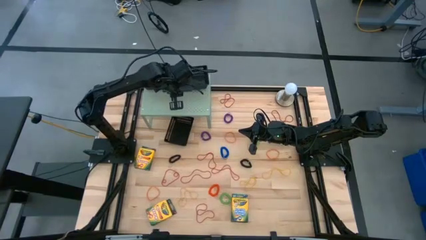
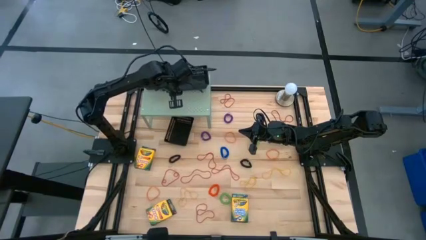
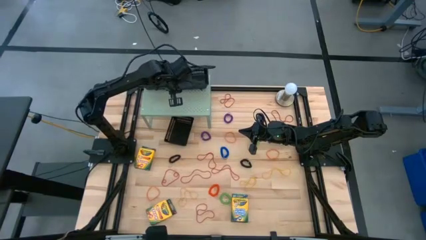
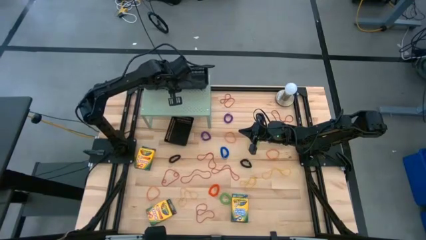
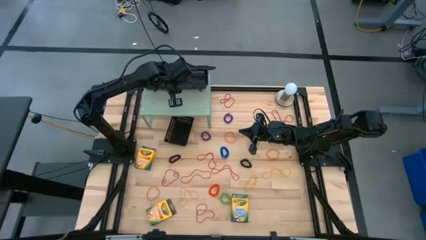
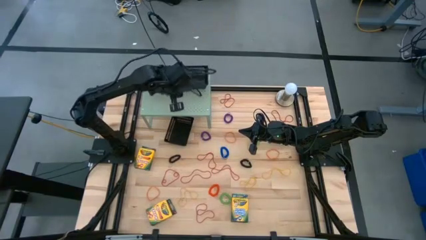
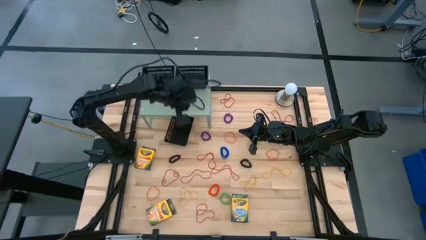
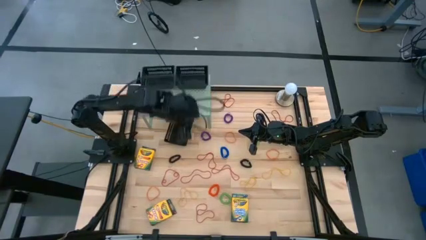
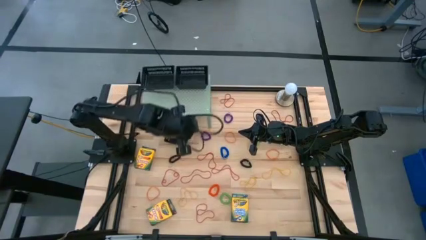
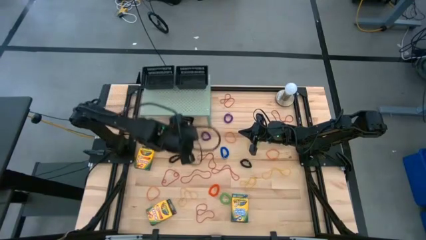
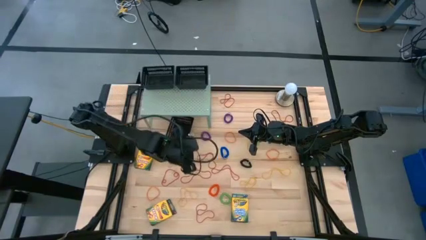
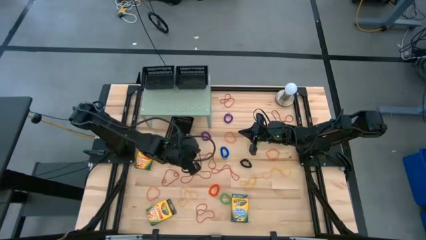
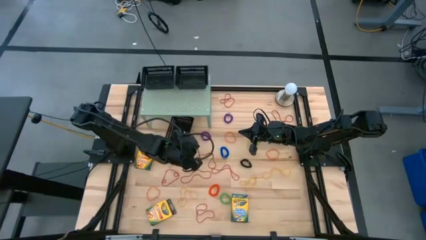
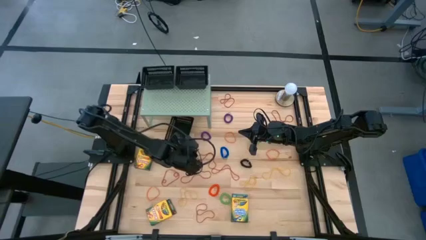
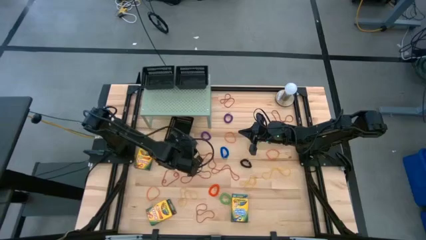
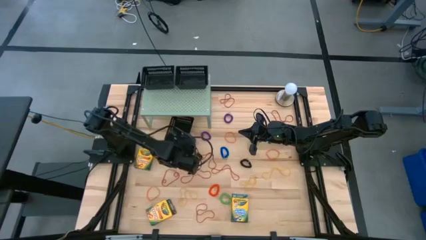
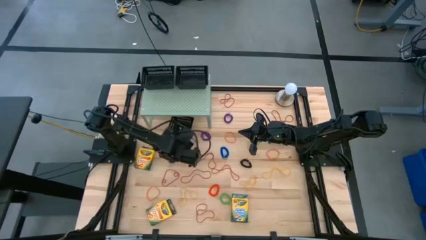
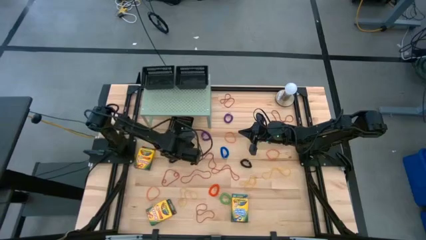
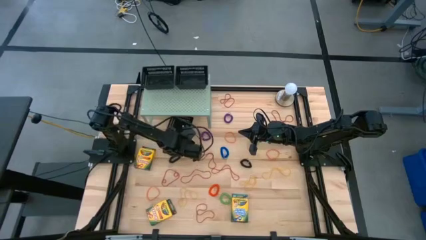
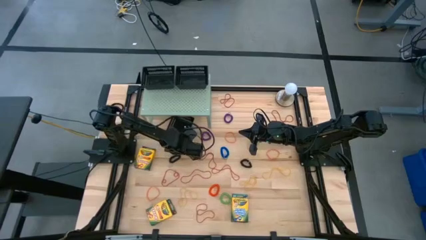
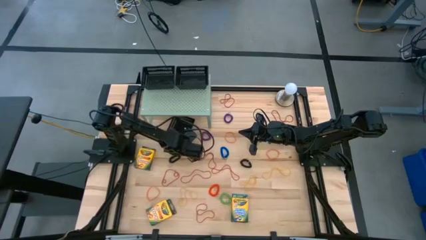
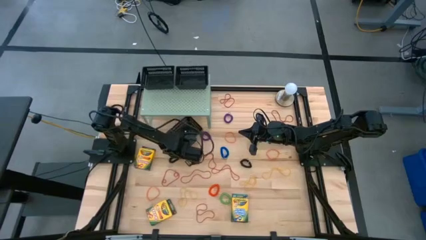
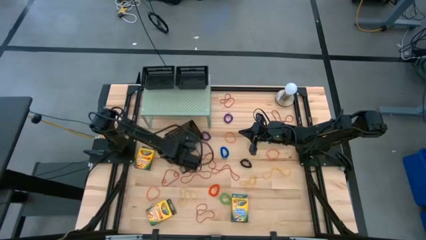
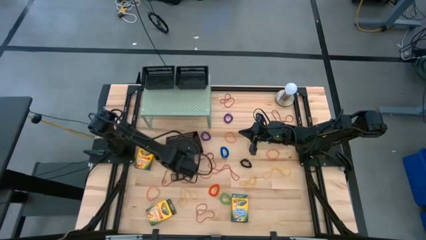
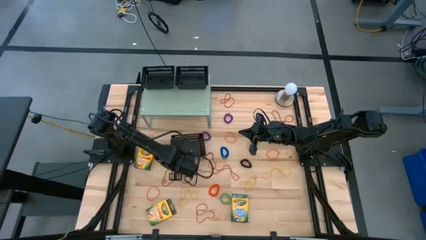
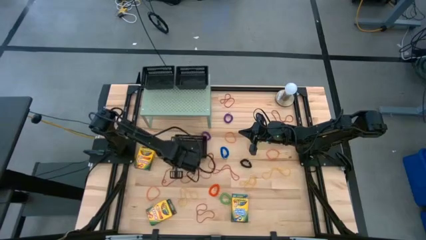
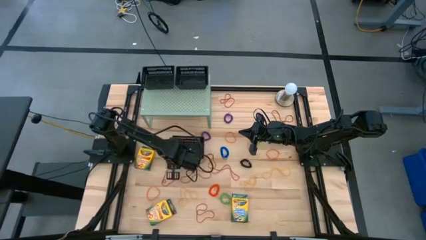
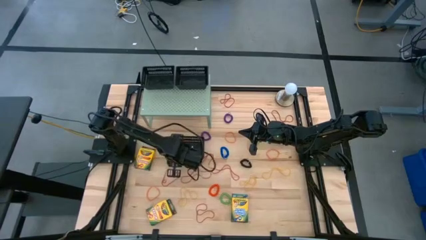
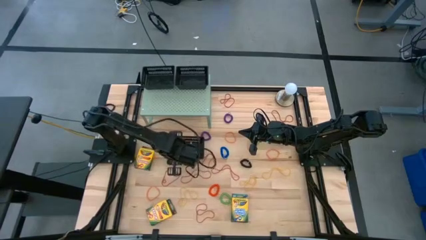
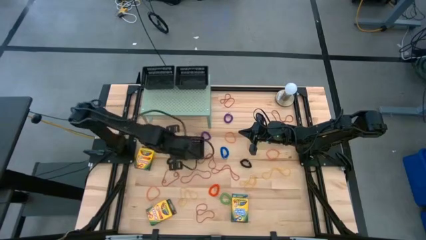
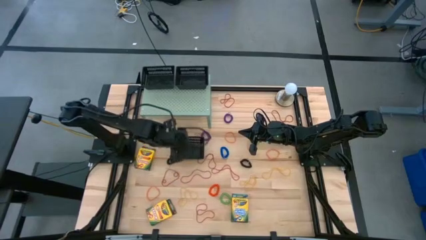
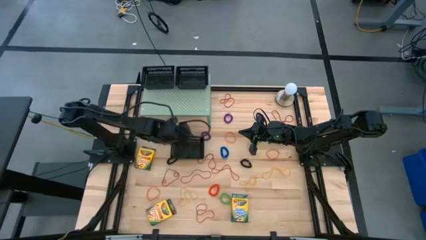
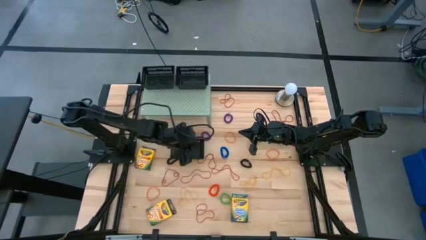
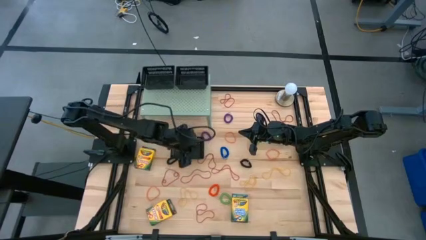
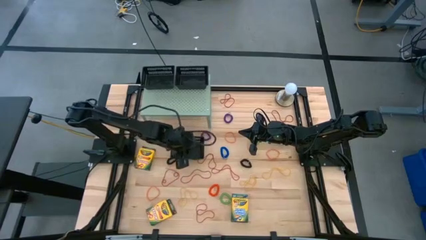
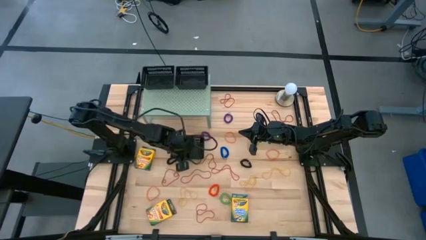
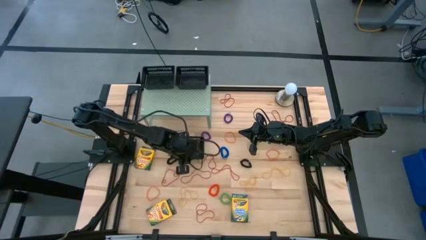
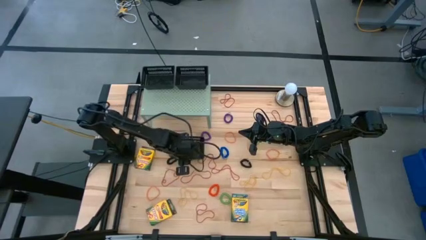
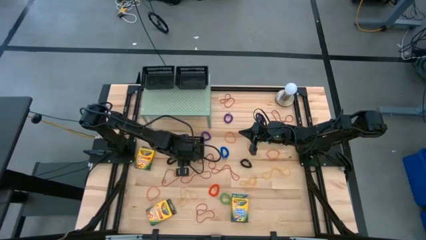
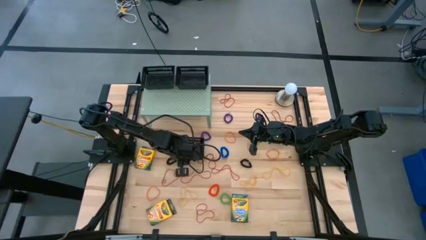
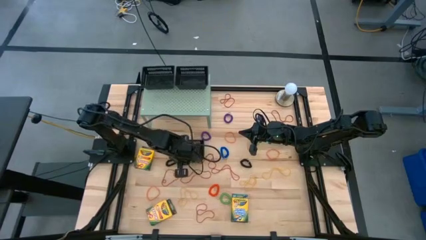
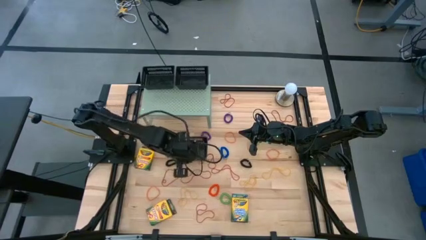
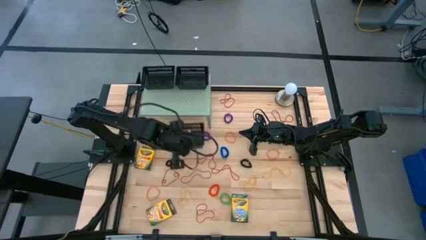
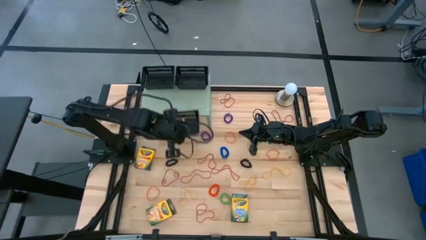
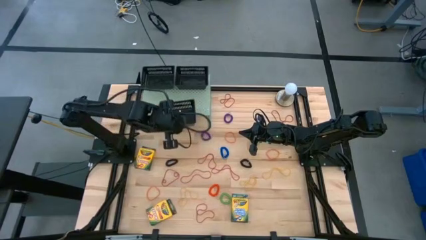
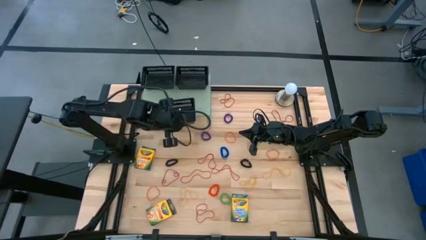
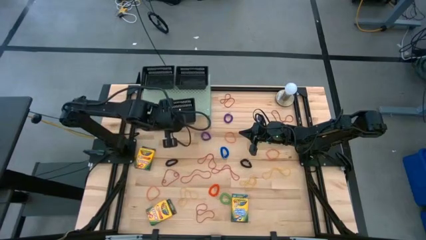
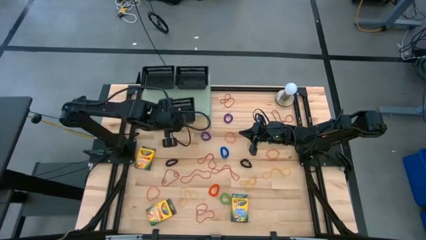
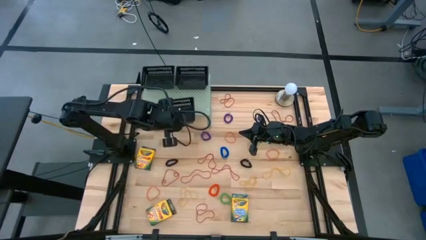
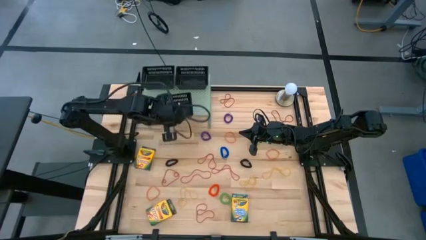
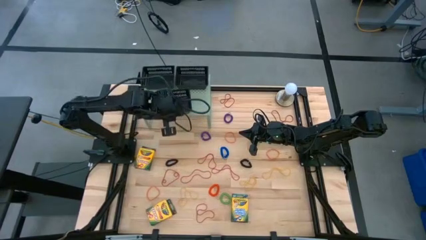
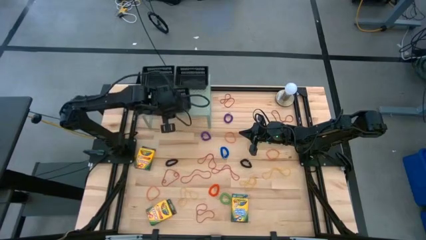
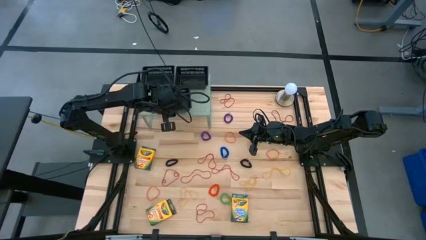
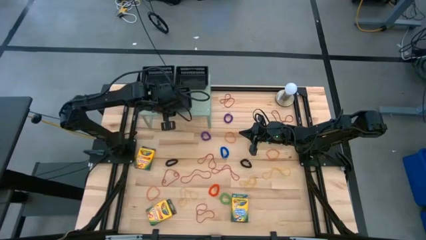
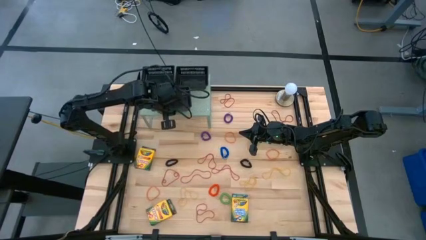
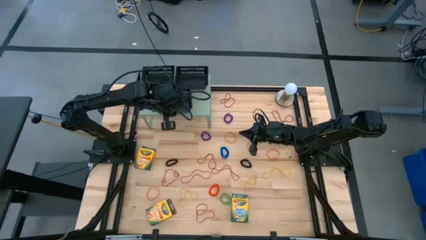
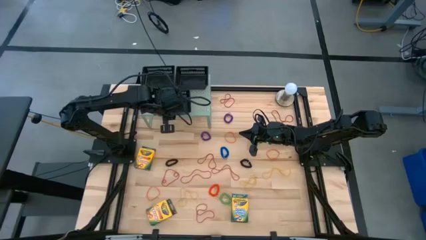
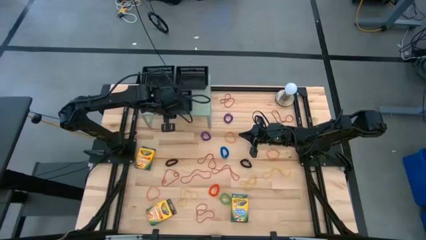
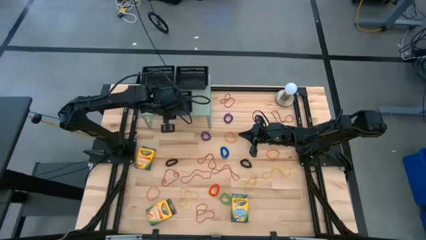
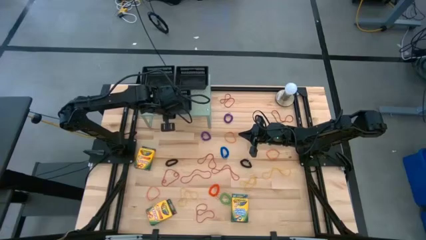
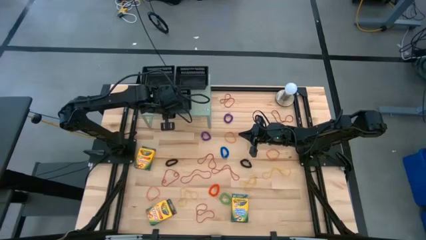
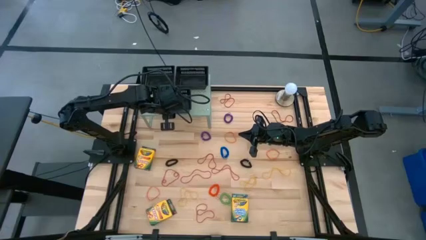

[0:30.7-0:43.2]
Task: Pick & Place Office Desk Supplies
Put the black bin on the shelf

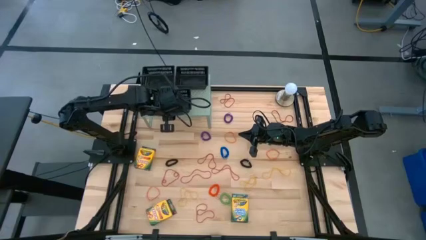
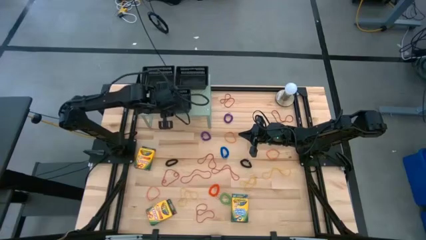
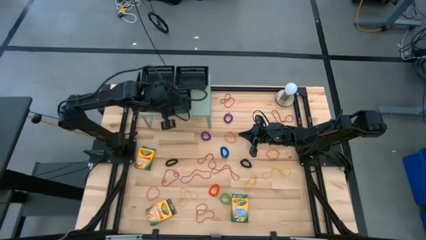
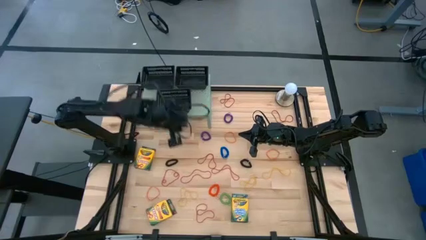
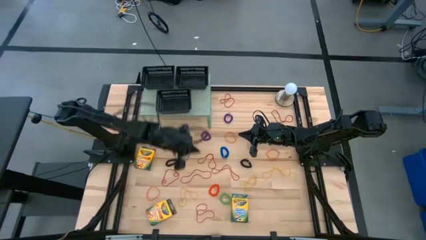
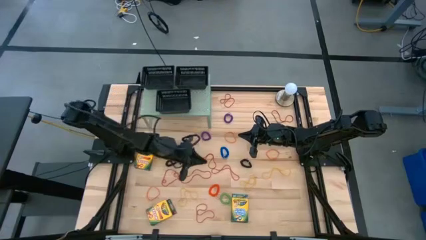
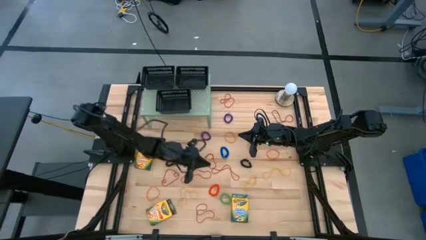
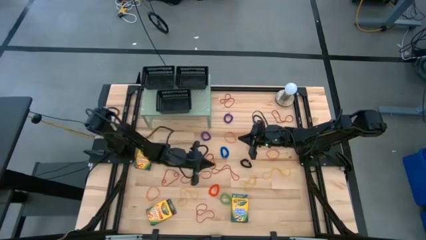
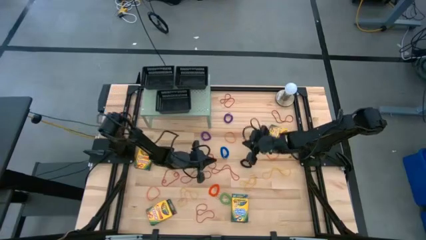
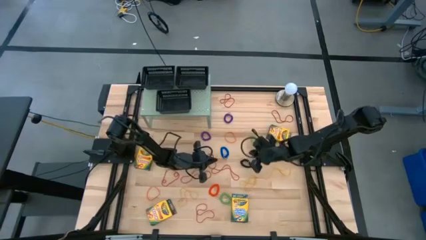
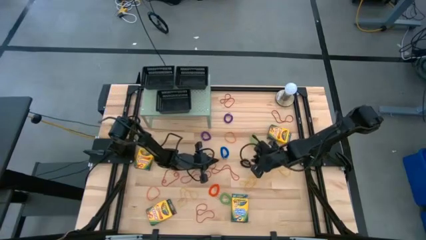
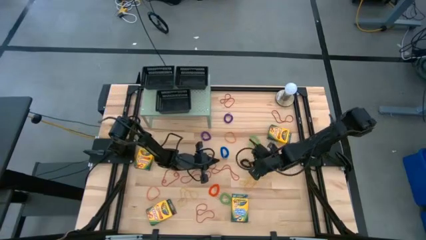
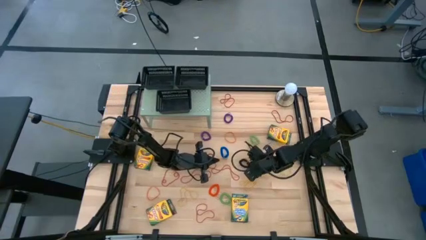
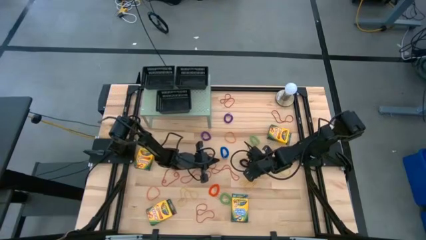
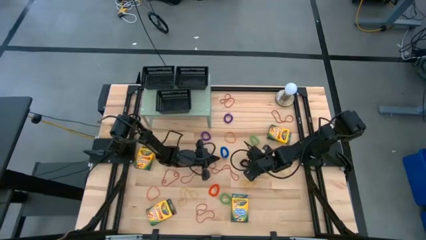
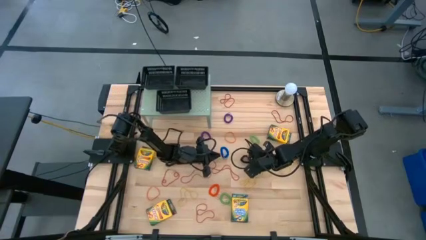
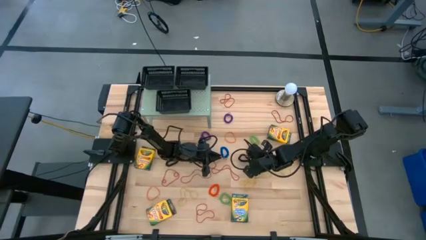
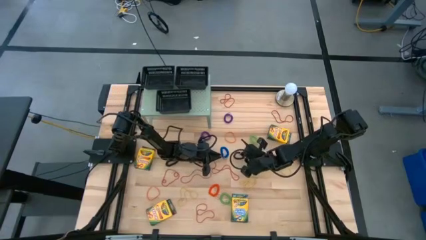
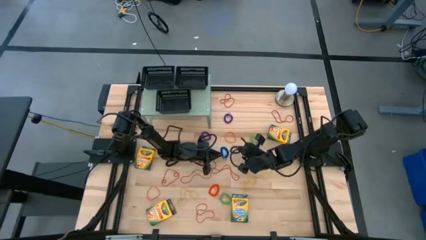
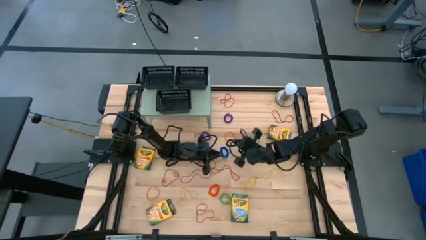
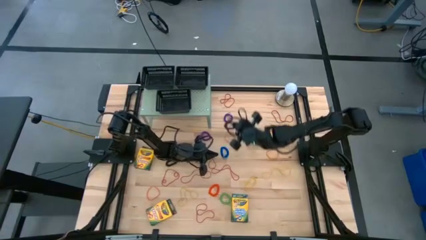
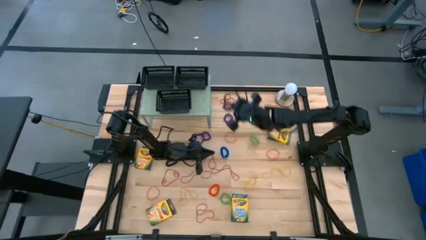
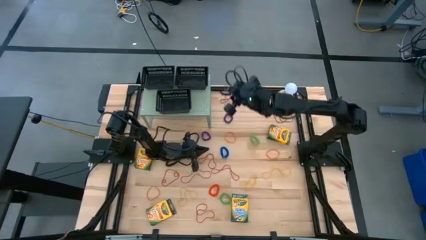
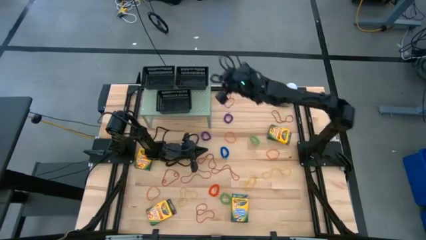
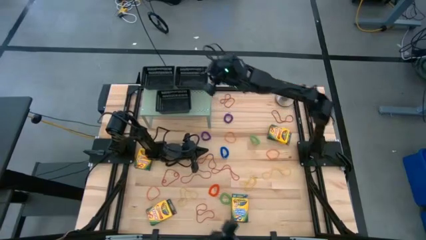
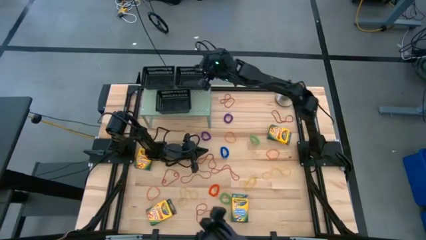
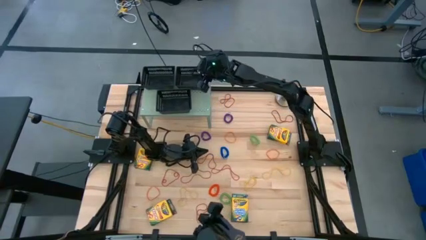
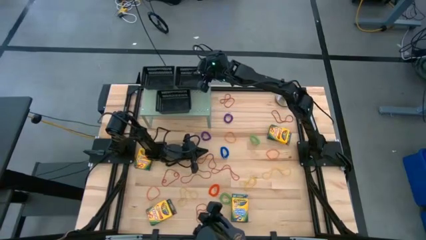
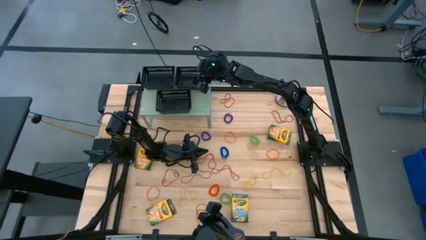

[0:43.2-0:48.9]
Put the black spring keychain into the top right black bin on the shelf
